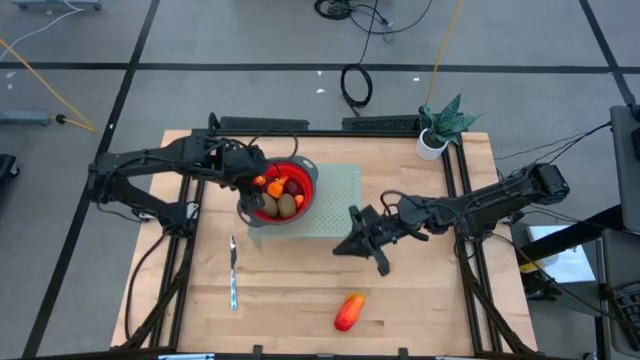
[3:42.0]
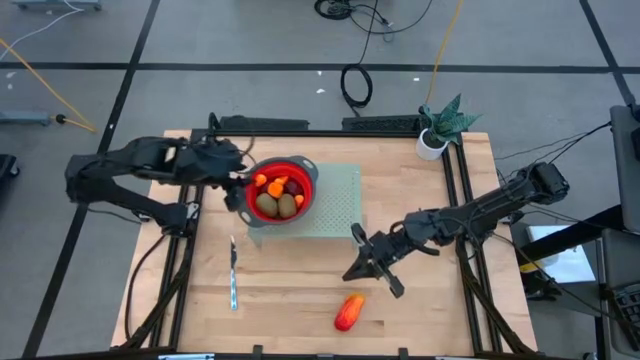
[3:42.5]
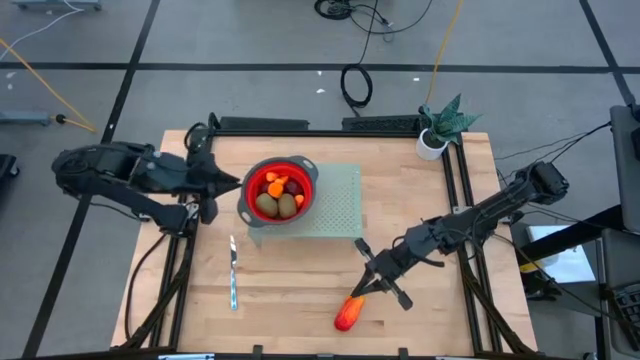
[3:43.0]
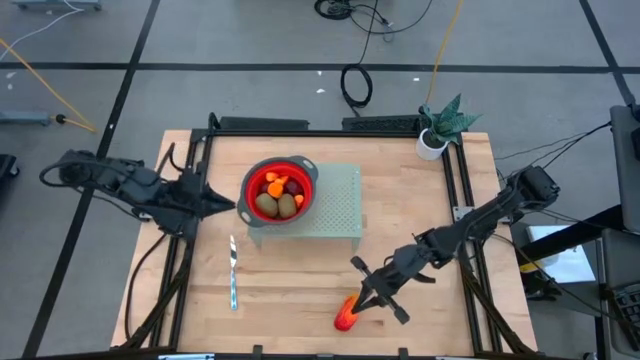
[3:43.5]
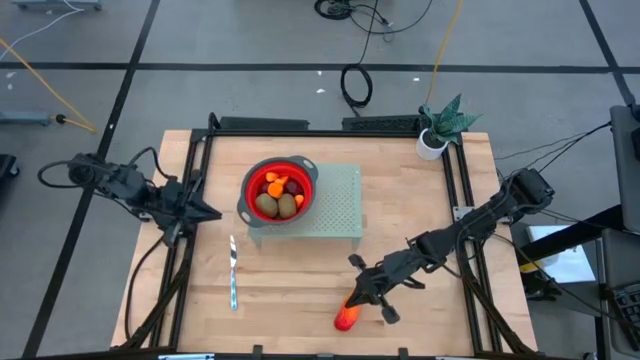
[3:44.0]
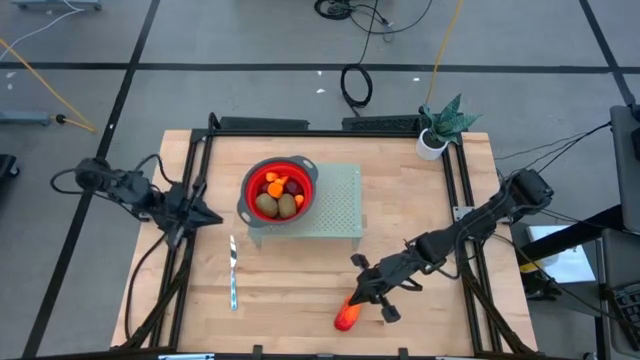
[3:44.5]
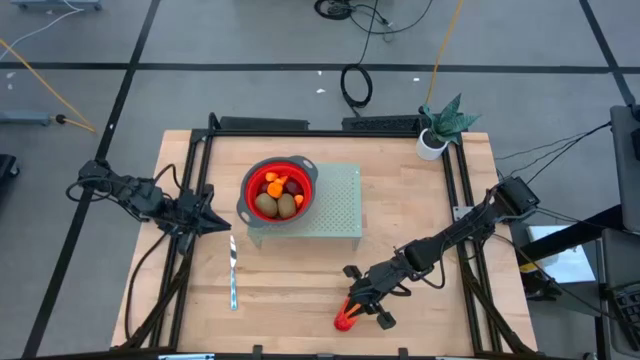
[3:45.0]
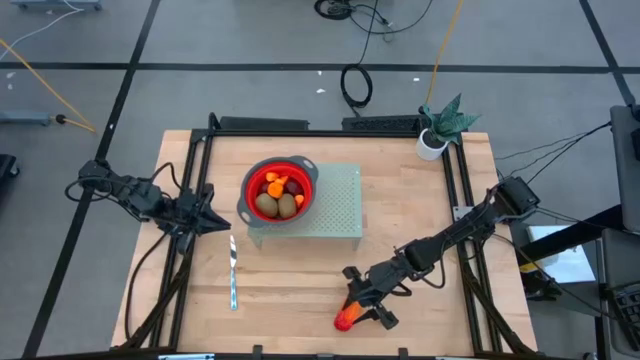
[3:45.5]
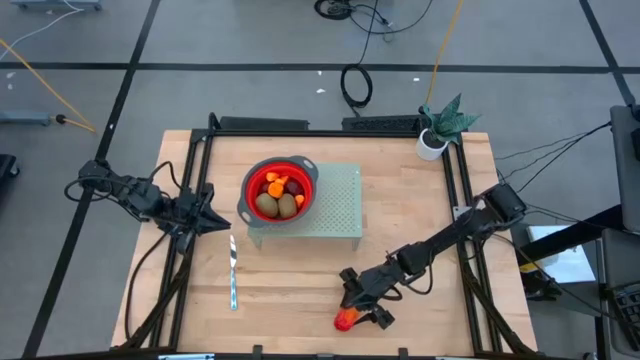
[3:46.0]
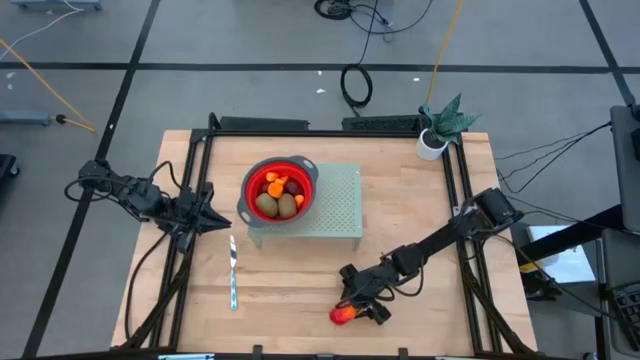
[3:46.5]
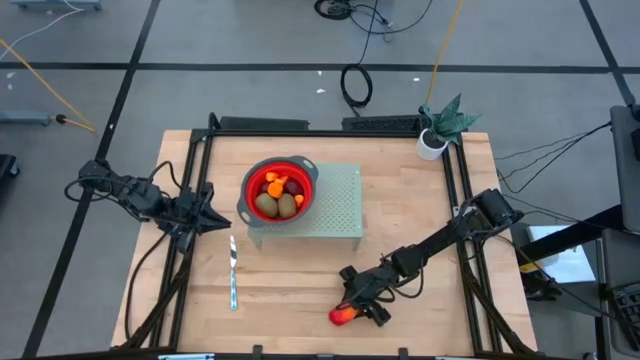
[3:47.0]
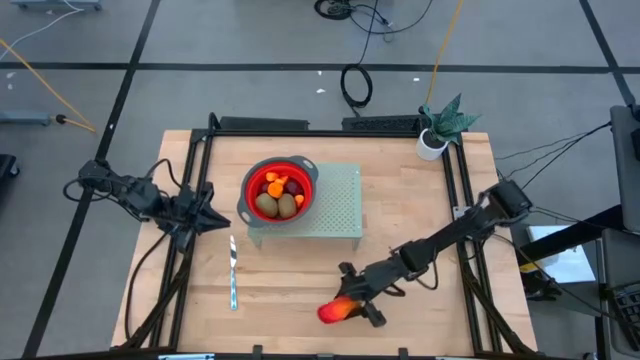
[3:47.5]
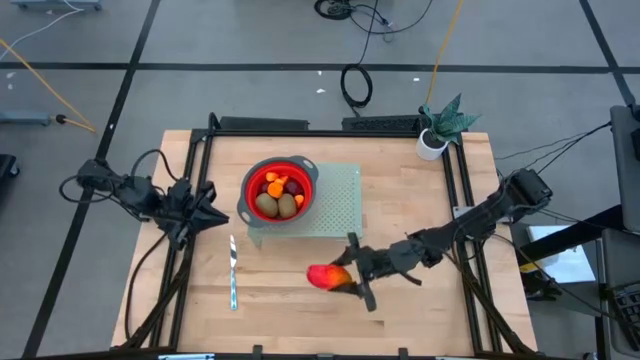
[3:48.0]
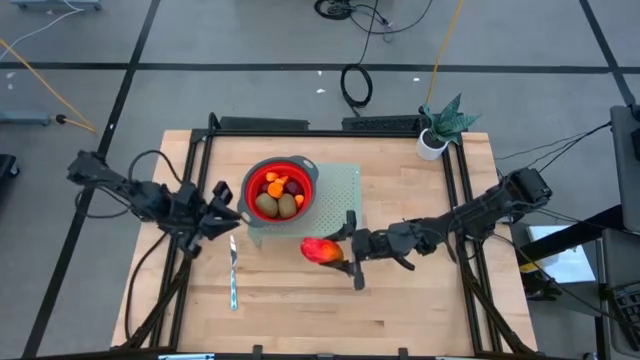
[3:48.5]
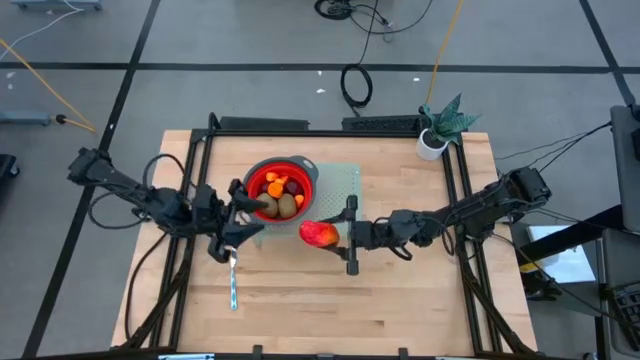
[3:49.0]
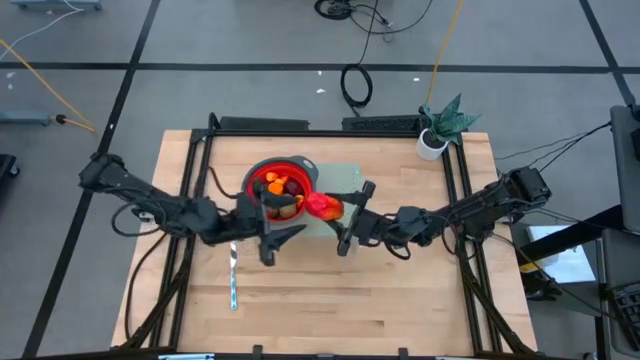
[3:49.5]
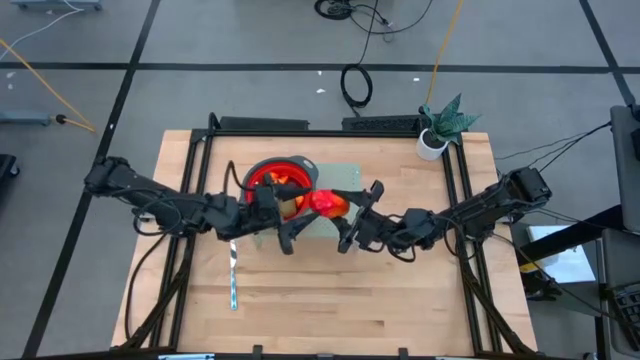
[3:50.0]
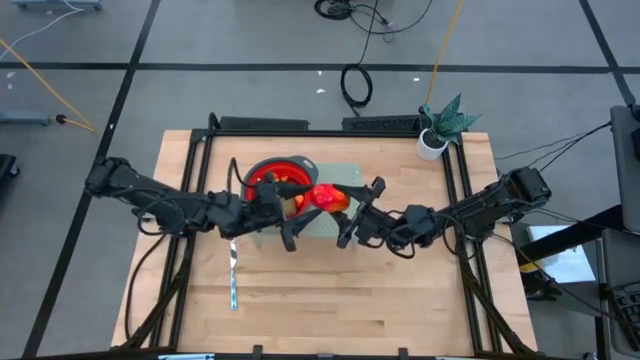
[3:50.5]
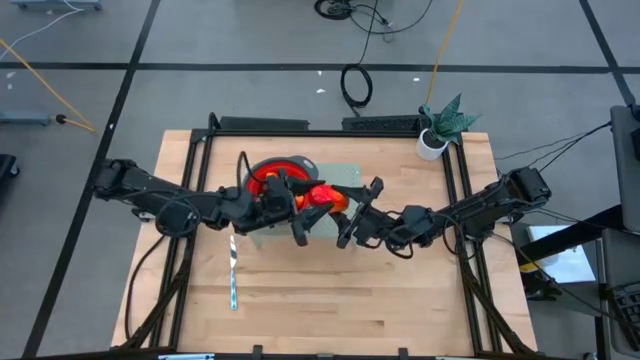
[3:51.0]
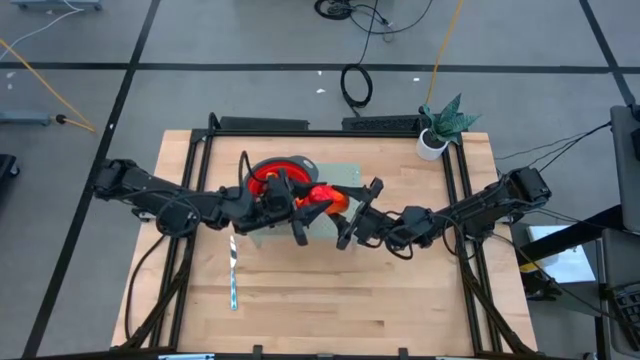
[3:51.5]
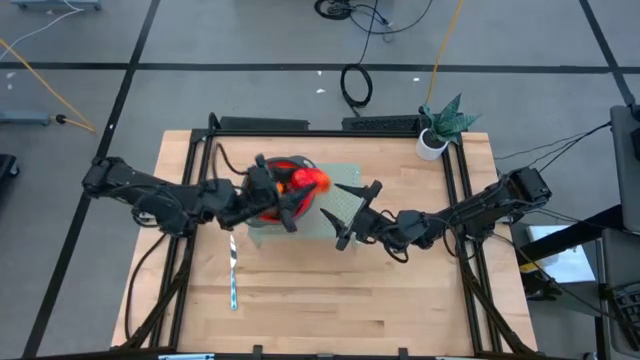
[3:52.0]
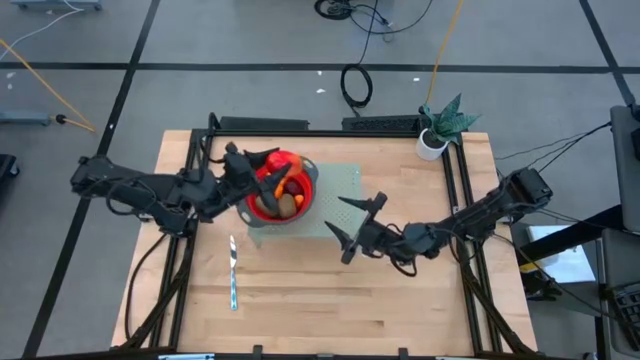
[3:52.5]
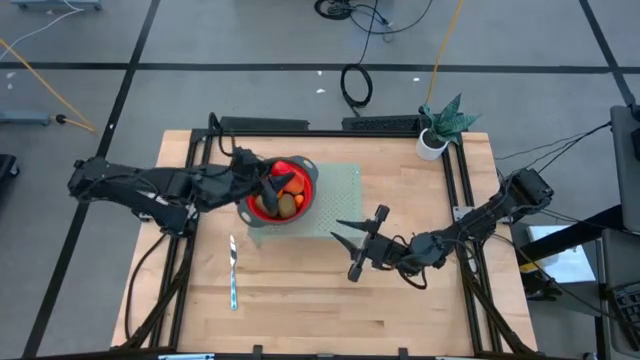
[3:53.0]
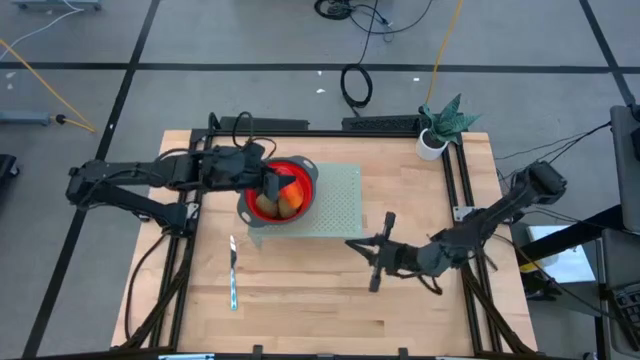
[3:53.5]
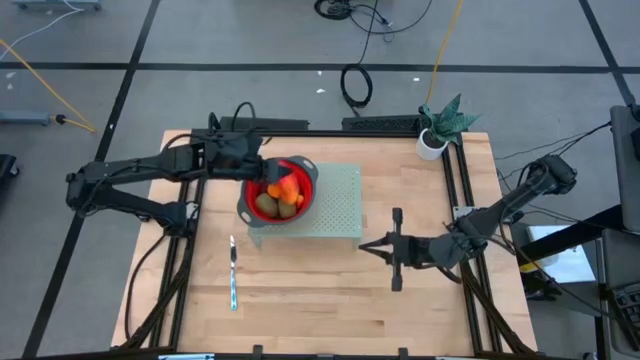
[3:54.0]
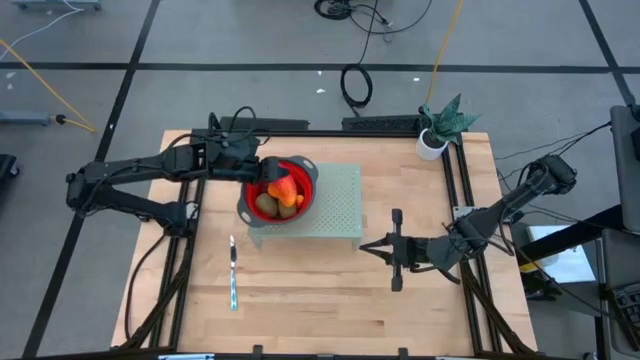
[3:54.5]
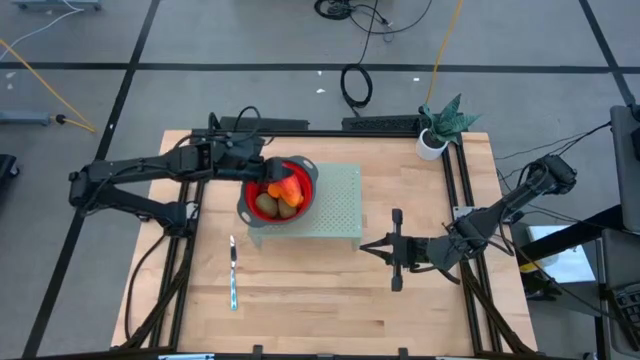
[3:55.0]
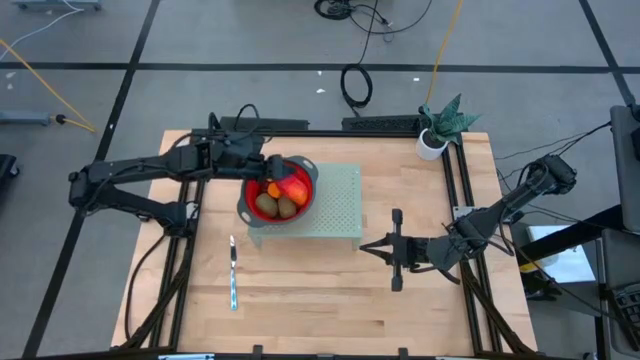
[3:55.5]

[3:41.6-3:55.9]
Task: Pick & Place Fruit
Put the mango into the strainer bowl on the shelf

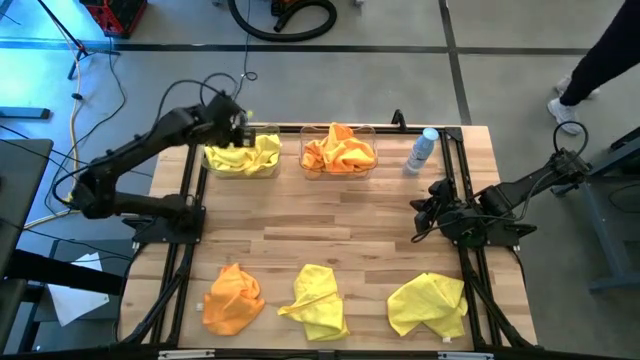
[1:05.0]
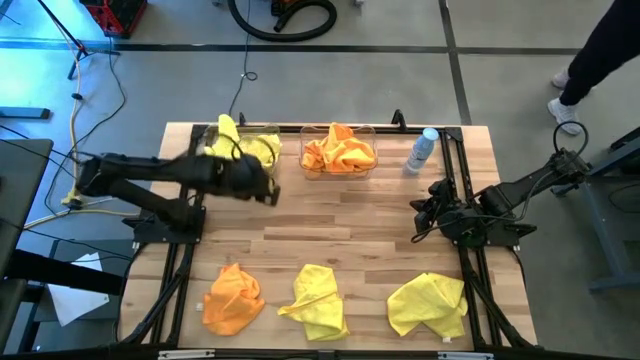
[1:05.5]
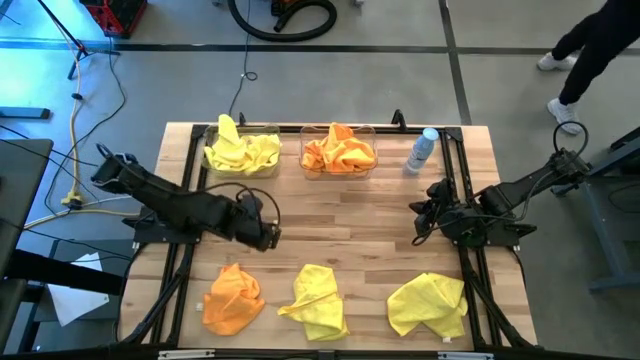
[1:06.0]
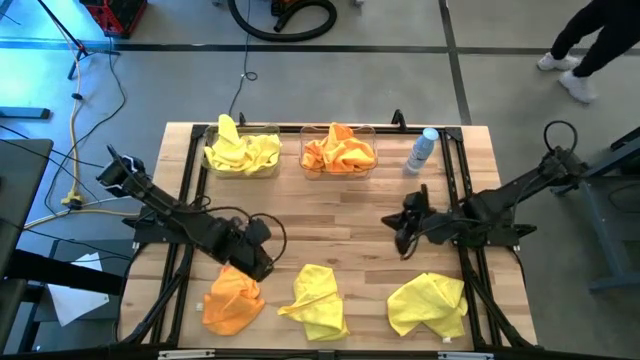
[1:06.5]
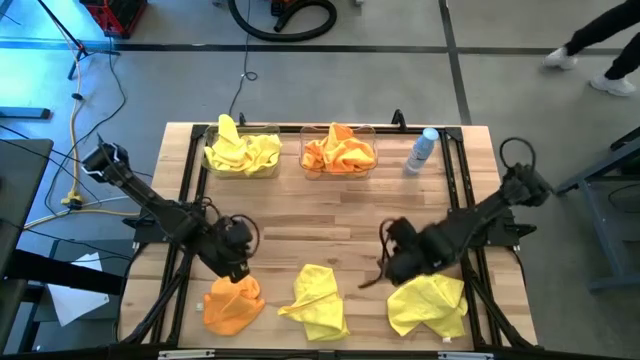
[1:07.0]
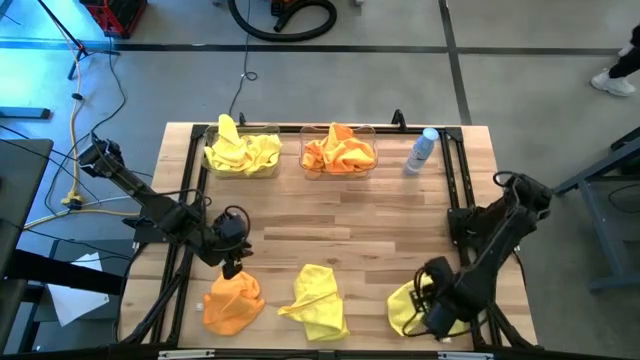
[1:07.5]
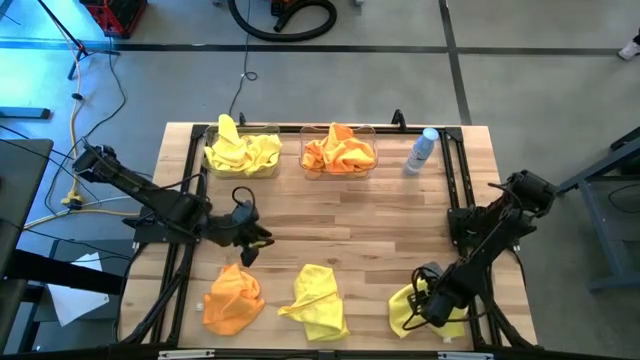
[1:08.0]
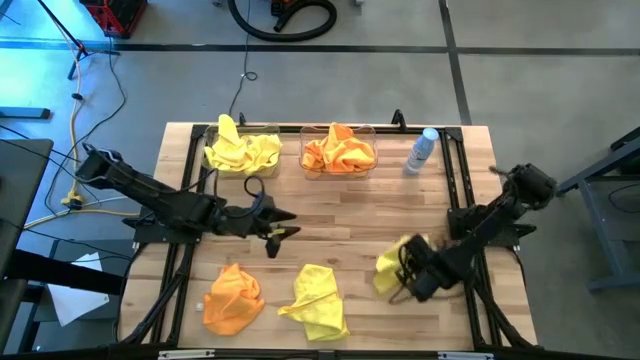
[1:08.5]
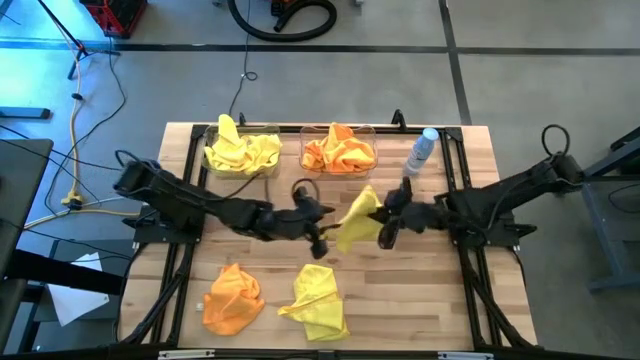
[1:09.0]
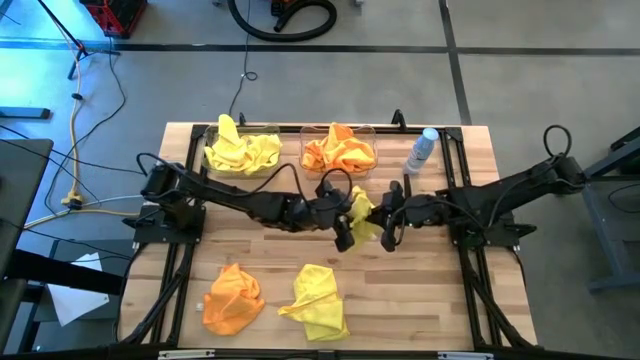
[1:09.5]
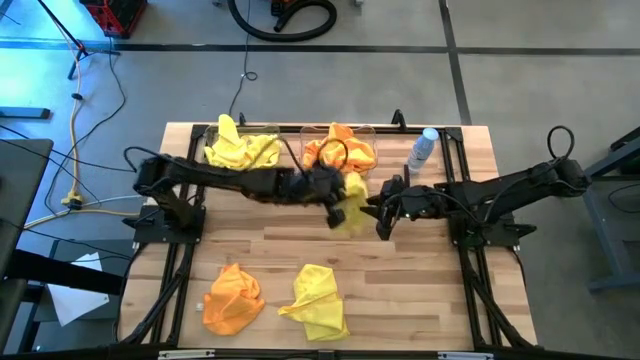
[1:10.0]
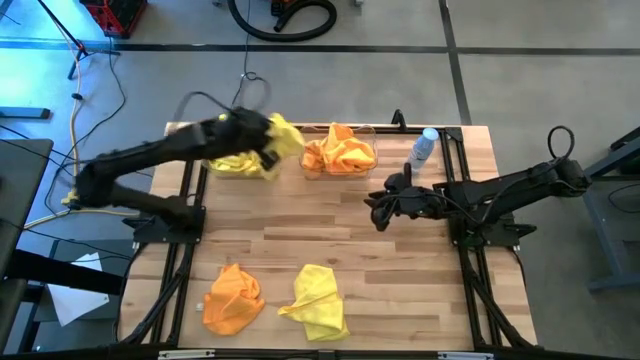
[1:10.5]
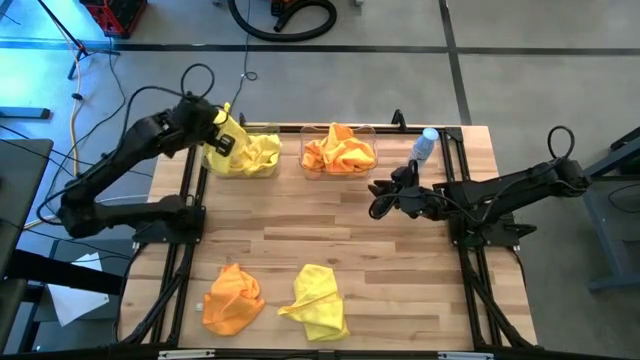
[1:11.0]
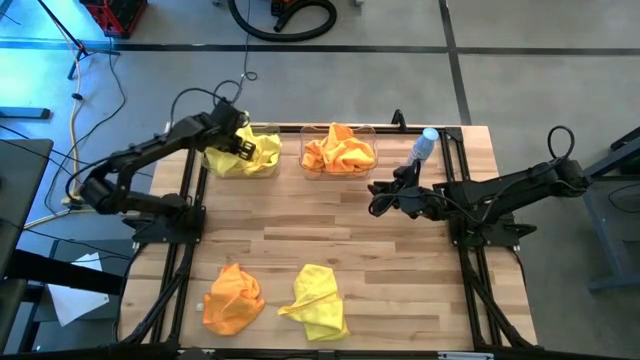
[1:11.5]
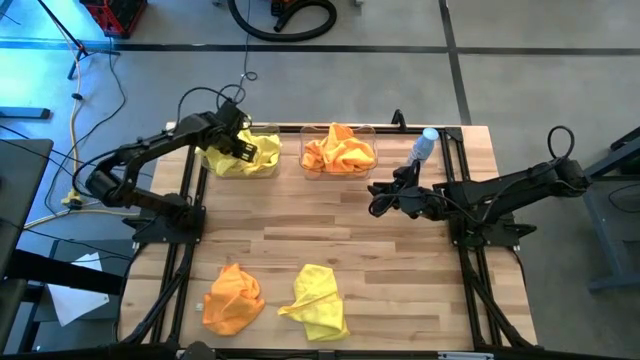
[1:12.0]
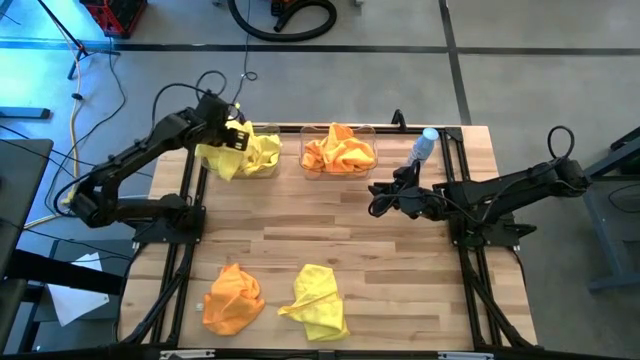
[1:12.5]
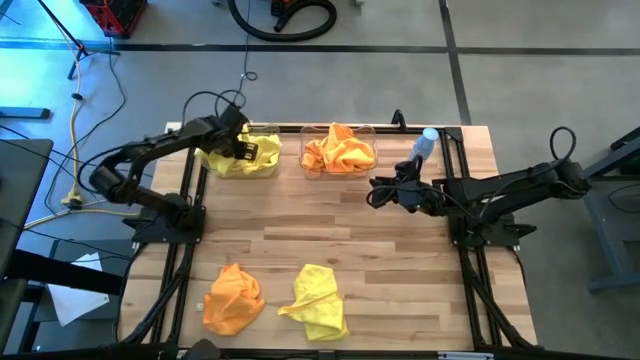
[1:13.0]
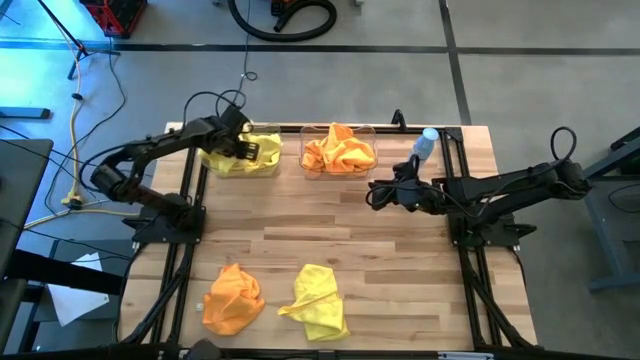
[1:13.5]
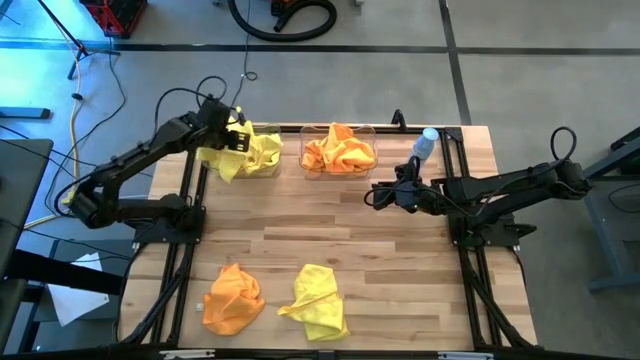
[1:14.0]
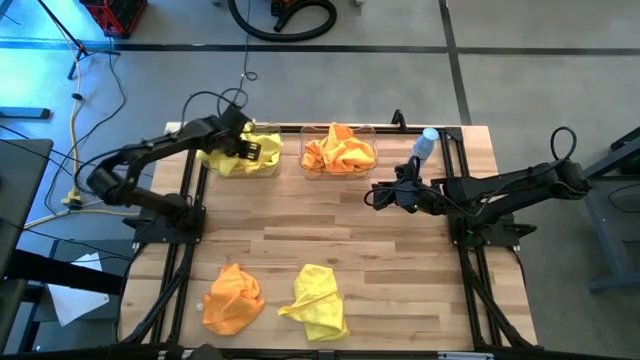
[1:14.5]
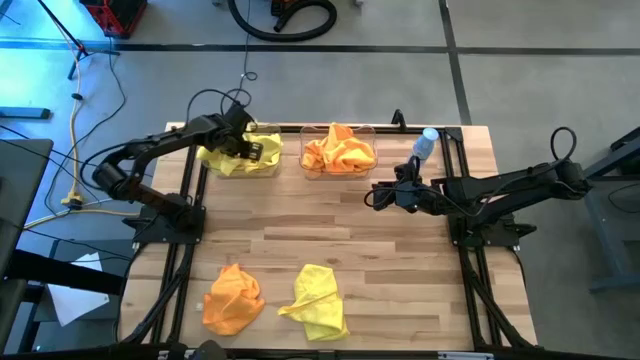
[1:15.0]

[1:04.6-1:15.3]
Task: Sort microfiber towel by color & place in baskets
Put the yellow microfiber towel into the left transparent bin
